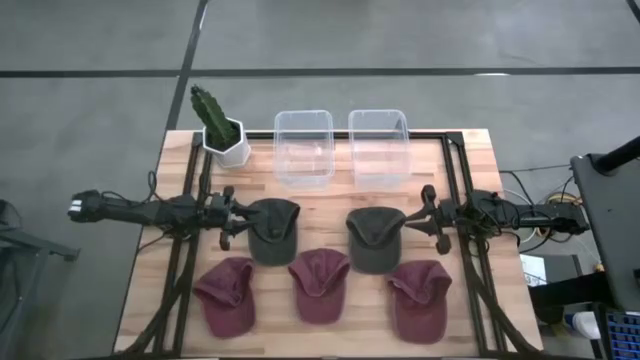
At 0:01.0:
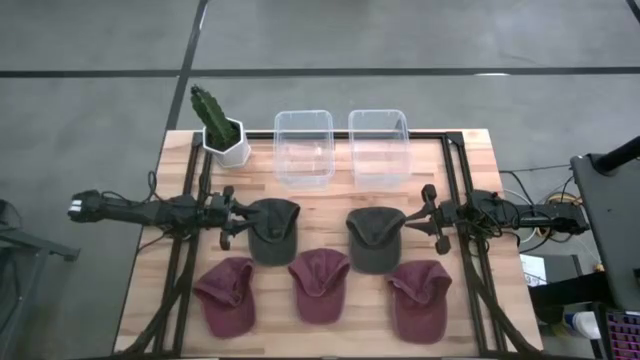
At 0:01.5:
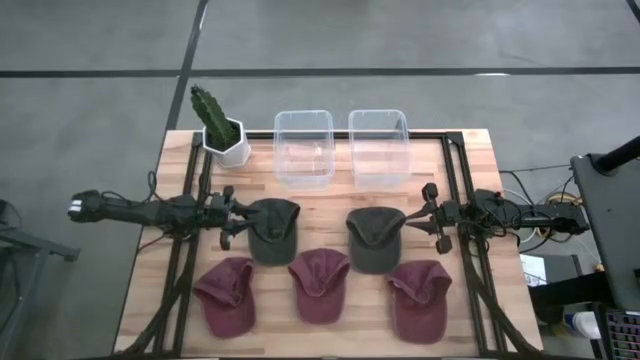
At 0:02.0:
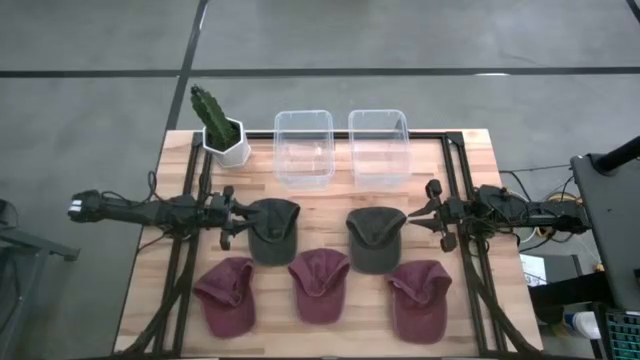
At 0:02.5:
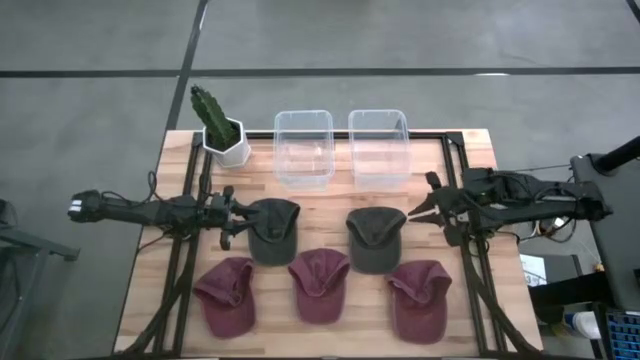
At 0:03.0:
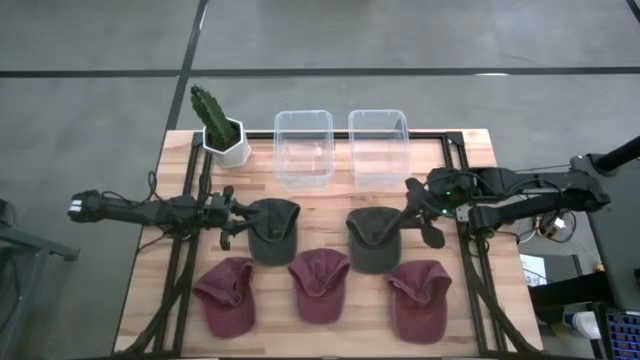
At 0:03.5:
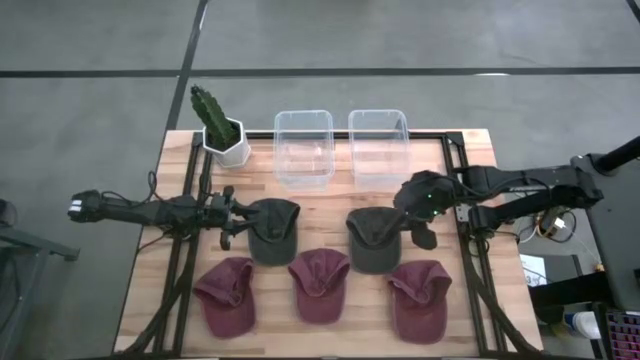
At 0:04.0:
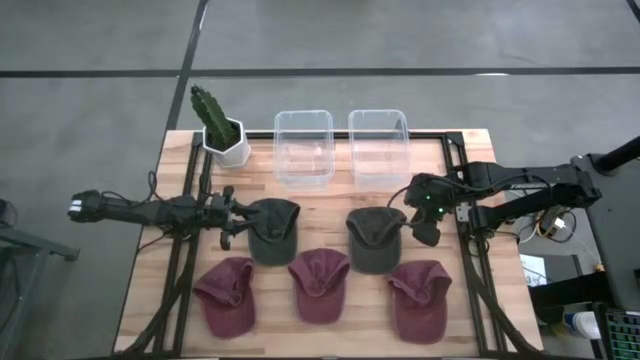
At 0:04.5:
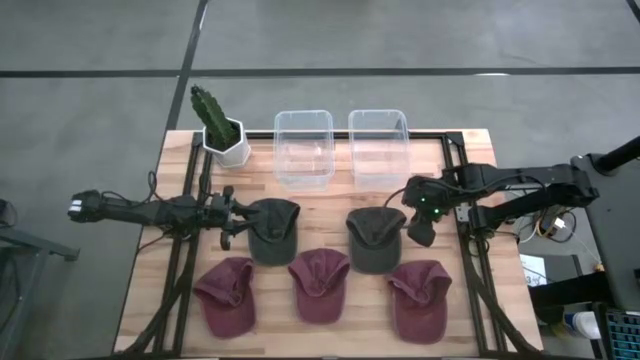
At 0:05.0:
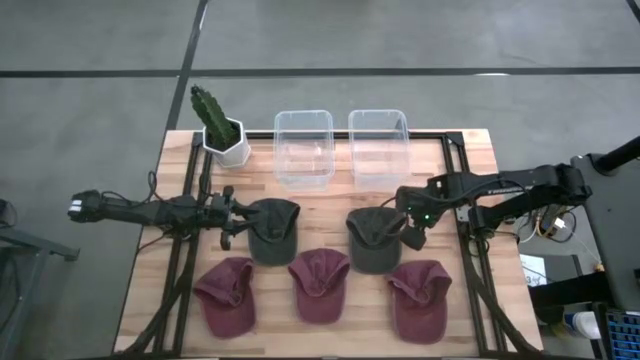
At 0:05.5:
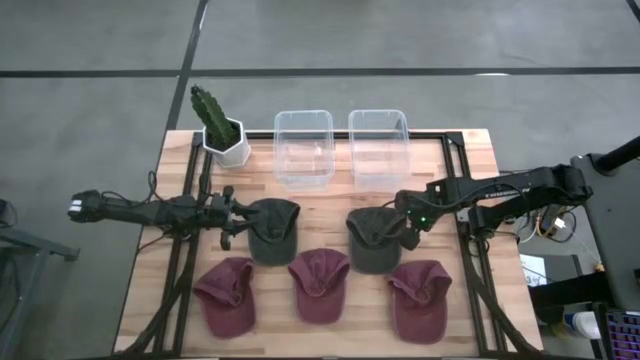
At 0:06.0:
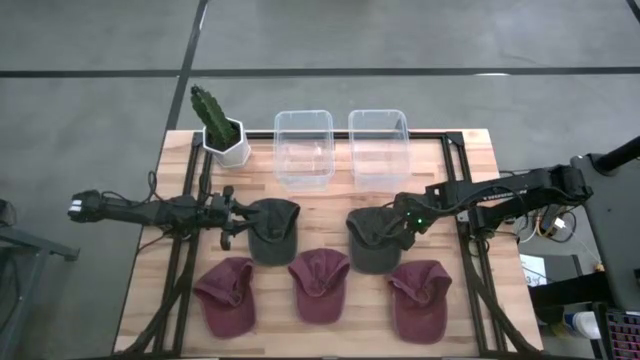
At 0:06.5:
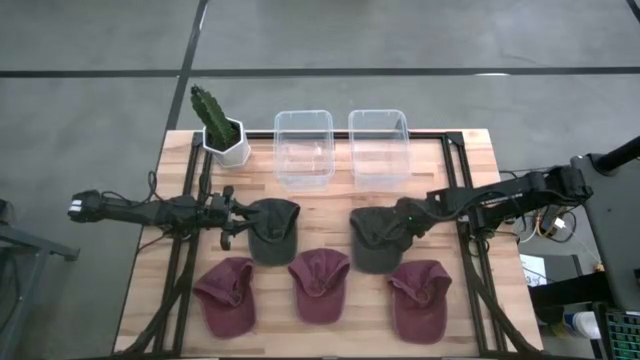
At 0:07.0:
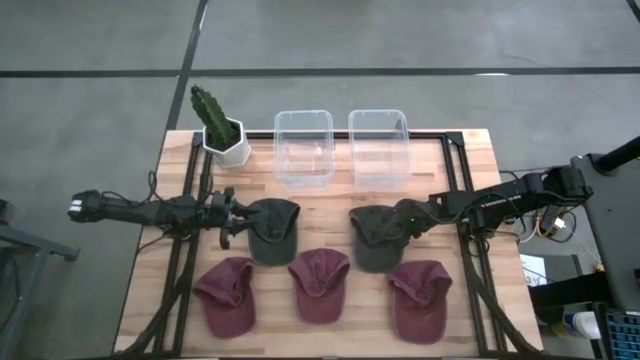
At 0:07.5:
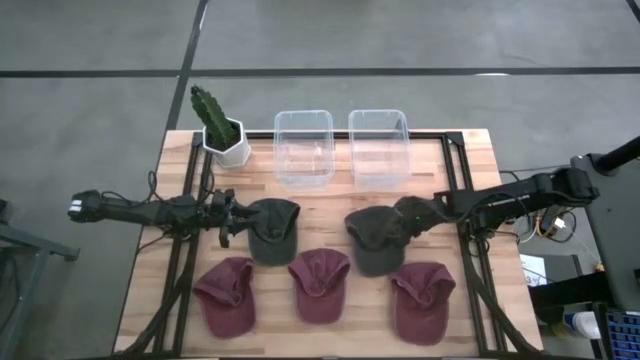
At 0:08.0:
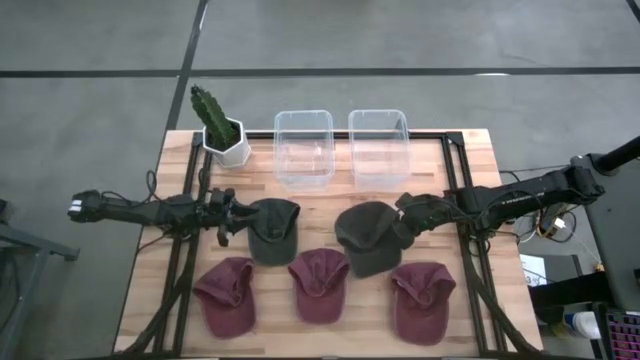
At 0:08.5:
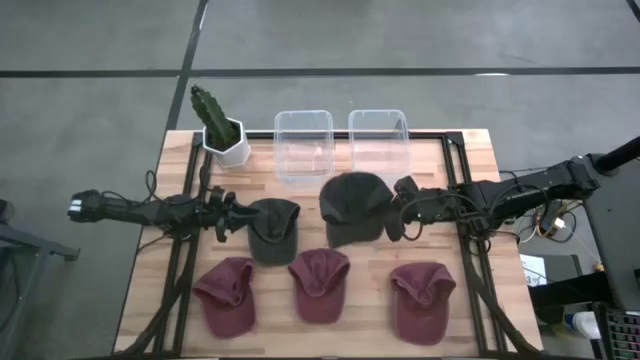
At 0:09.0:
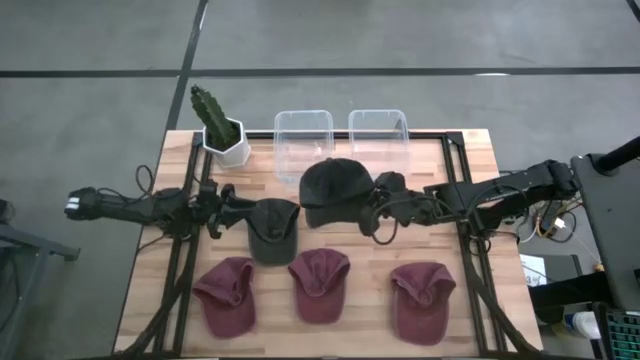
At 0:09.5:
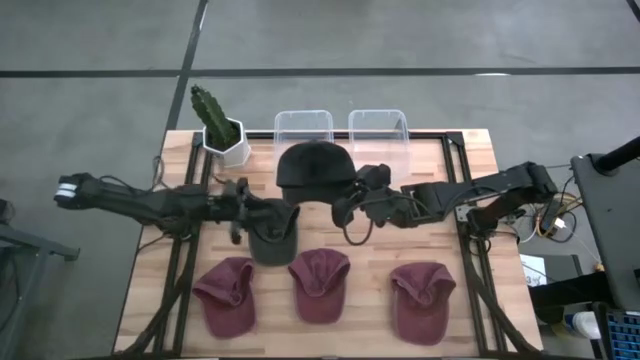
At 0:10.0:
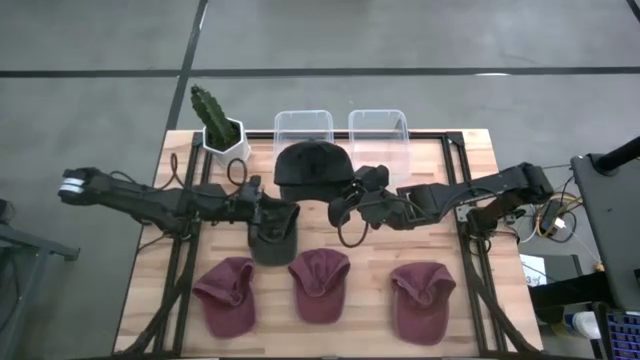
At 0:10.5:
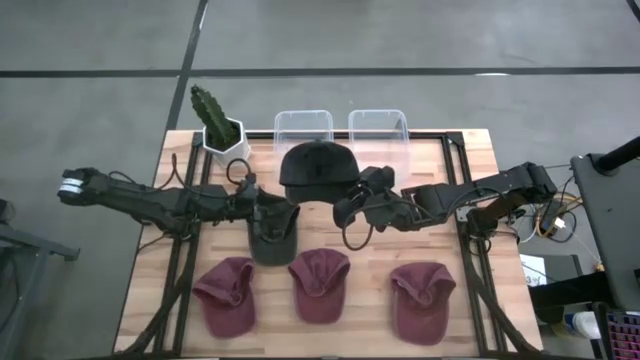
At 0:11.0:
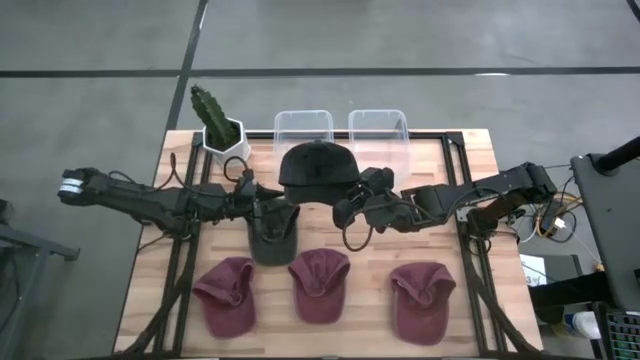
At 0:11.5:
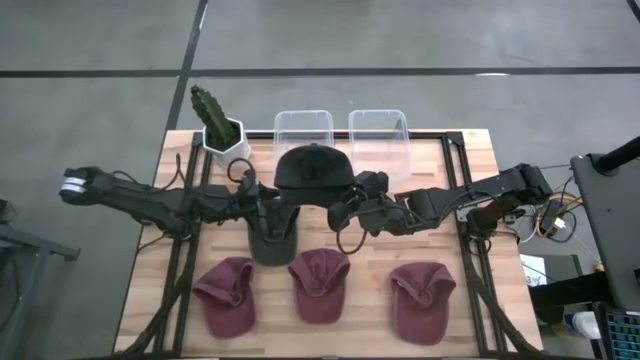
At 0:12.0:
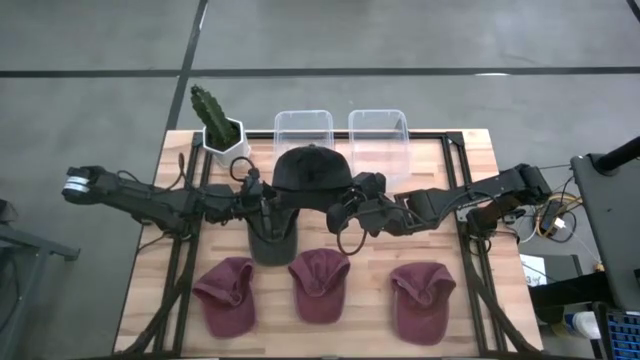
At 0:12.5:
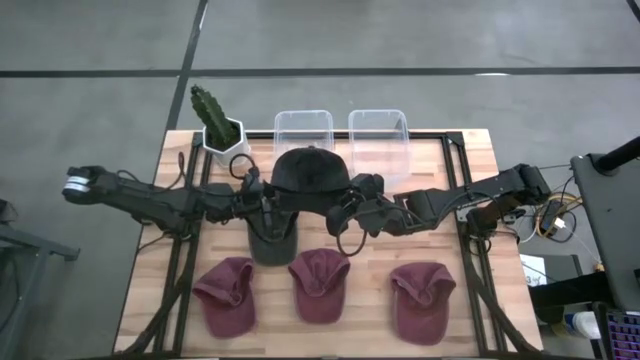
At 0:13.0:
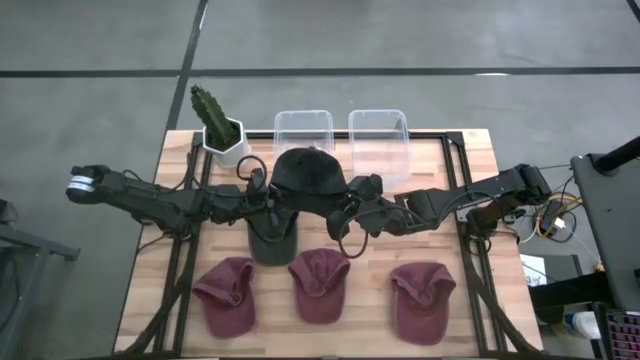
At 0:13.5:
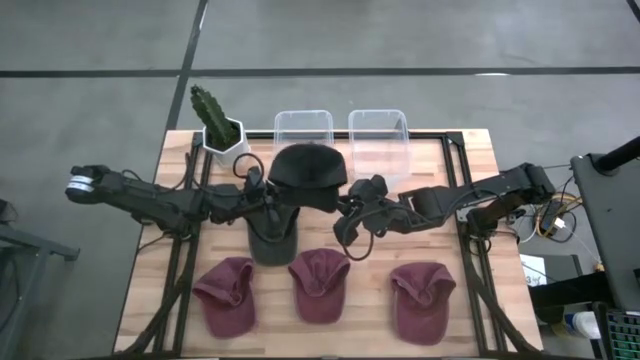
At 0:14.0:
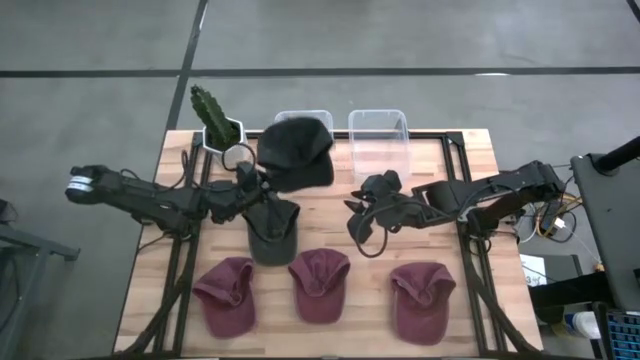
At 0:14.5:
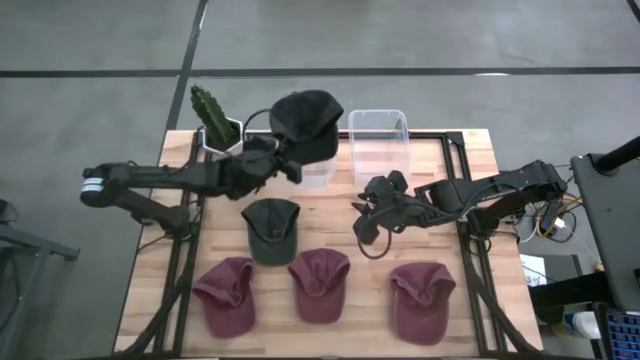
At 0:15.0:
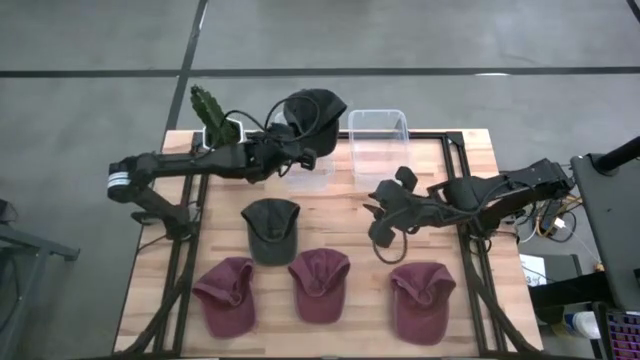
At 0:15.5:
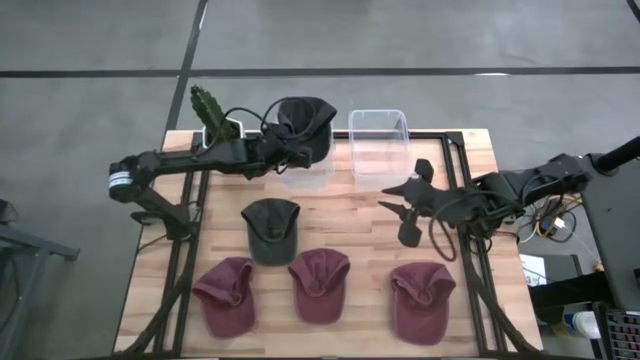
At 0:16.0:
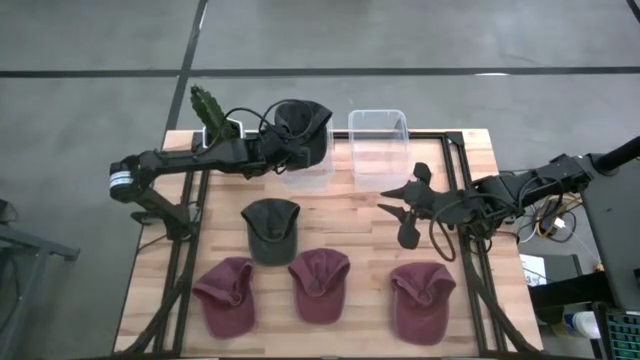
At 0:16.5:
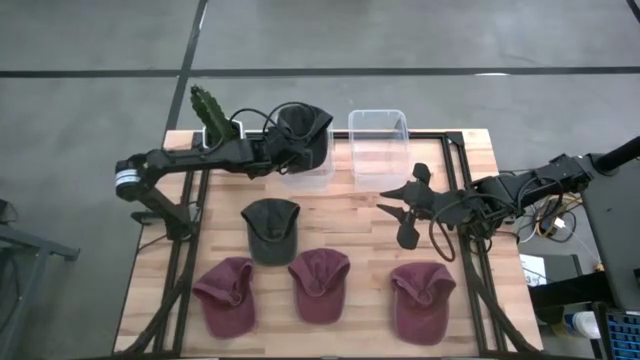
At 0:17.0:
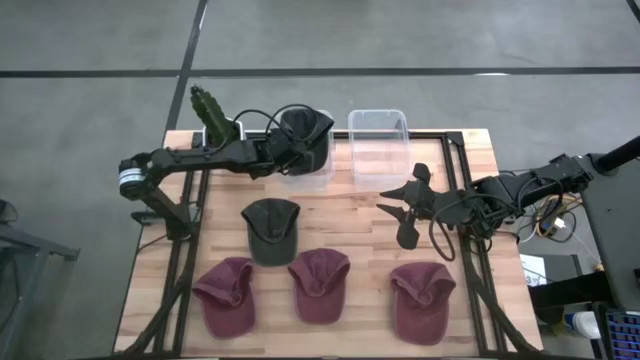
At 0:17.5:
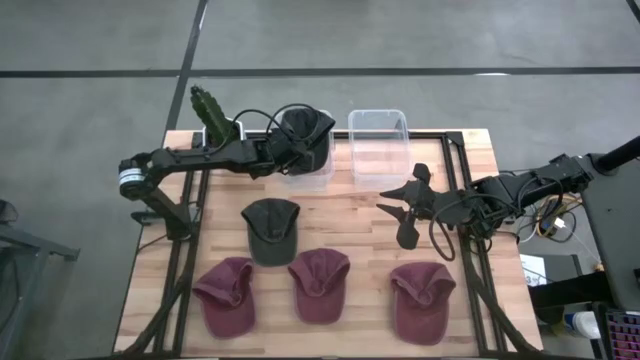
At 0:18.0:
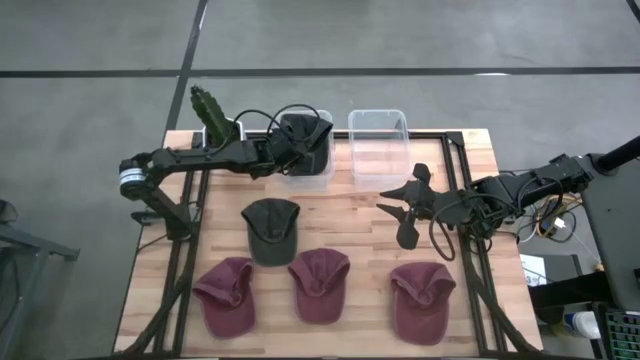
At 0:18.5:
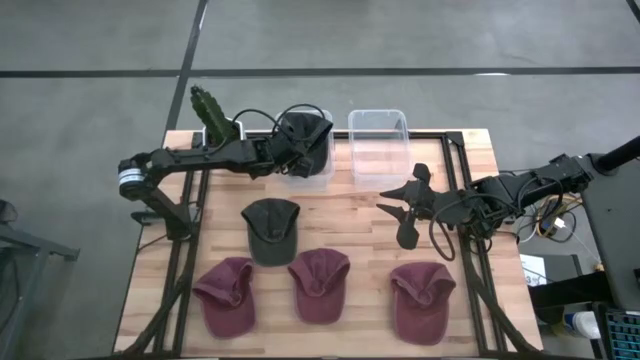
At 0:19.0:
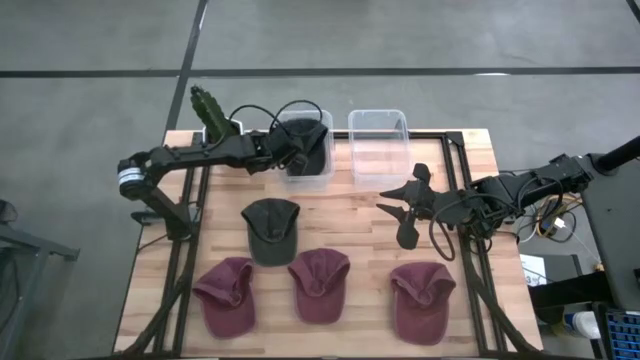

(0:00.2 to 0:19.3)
Task: Pick & Place hat
Put the right black cap into the left transparent bin
